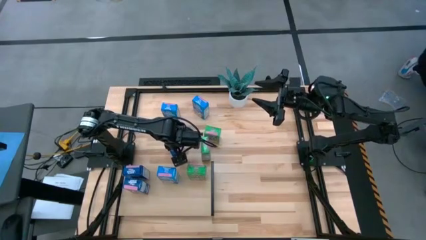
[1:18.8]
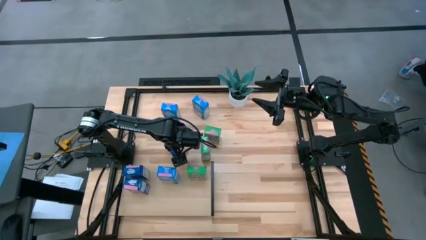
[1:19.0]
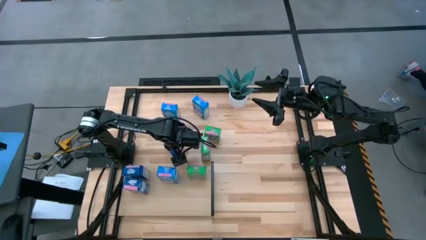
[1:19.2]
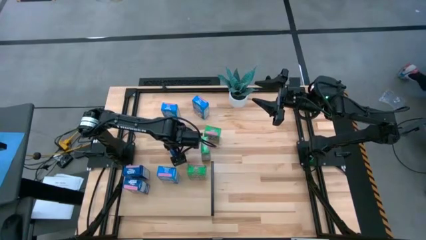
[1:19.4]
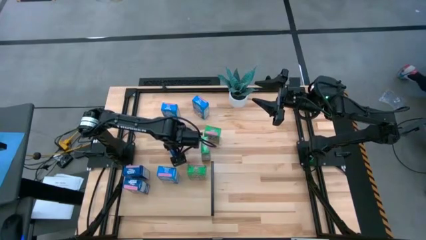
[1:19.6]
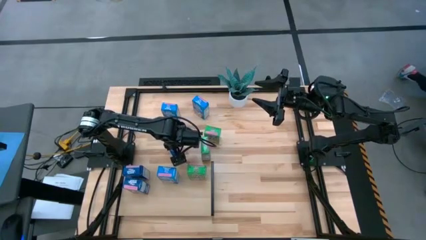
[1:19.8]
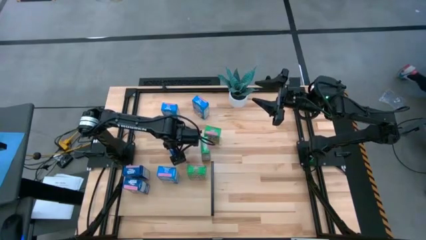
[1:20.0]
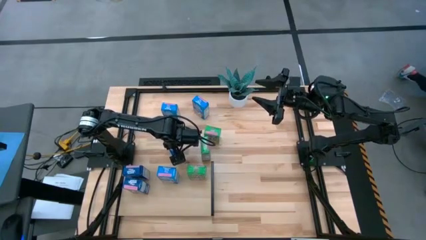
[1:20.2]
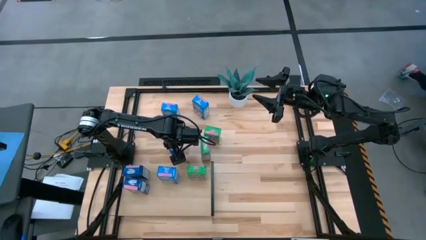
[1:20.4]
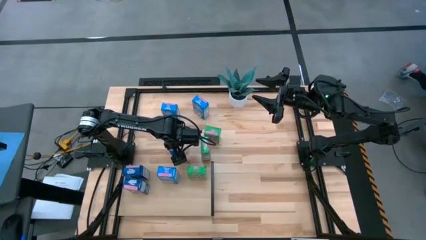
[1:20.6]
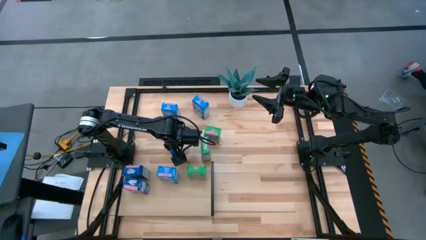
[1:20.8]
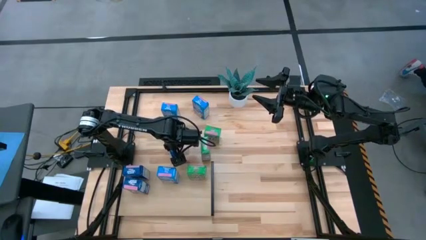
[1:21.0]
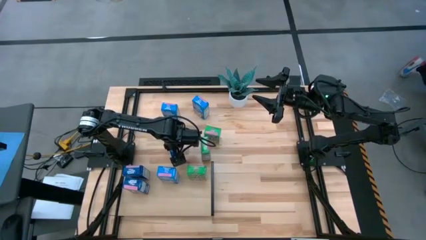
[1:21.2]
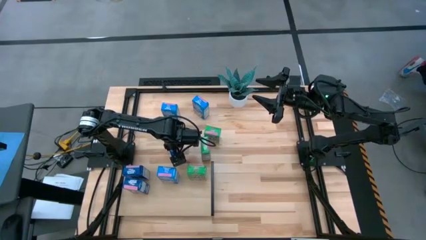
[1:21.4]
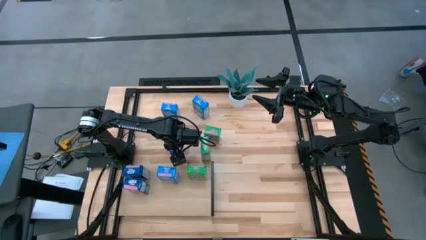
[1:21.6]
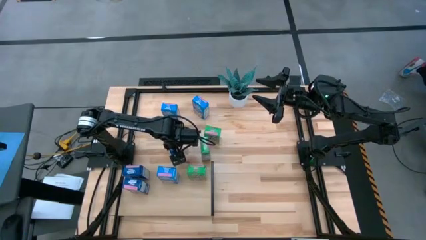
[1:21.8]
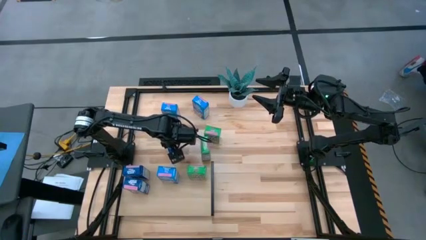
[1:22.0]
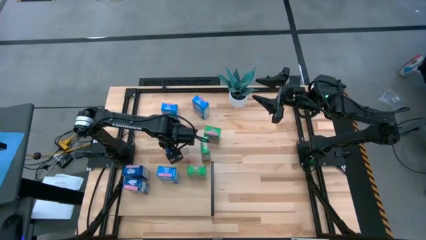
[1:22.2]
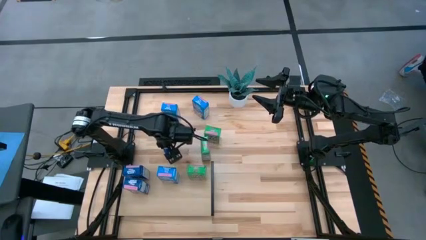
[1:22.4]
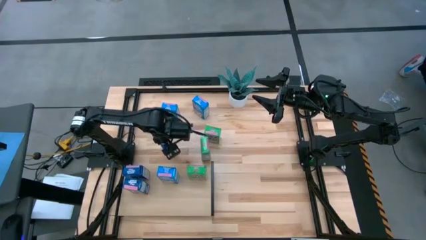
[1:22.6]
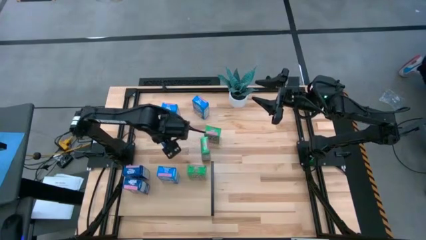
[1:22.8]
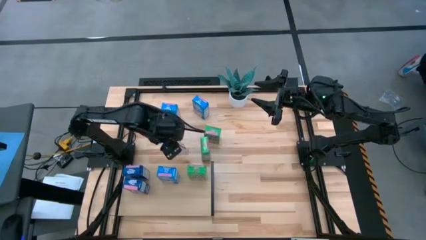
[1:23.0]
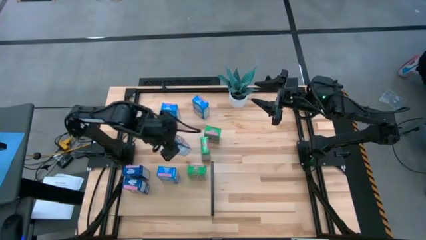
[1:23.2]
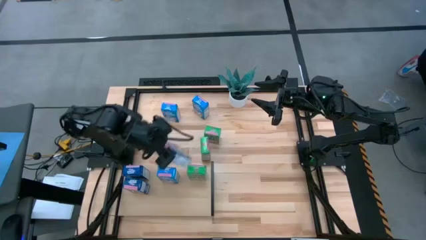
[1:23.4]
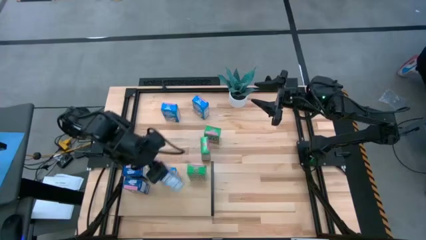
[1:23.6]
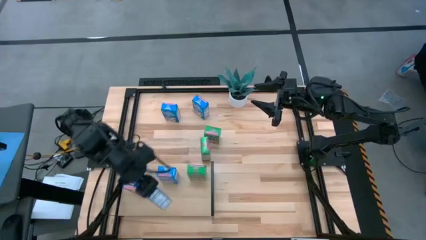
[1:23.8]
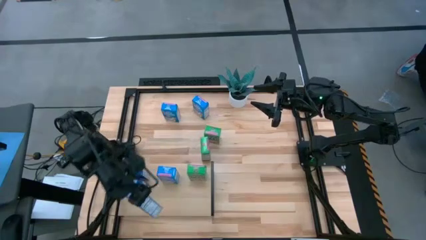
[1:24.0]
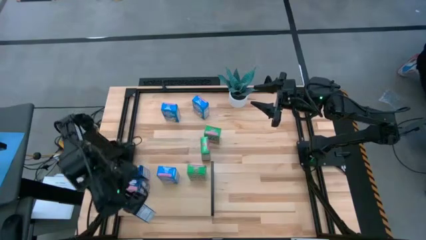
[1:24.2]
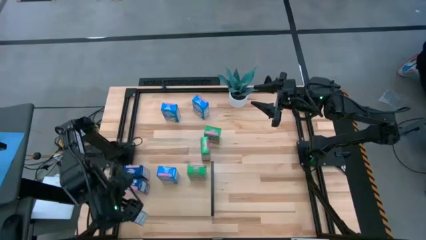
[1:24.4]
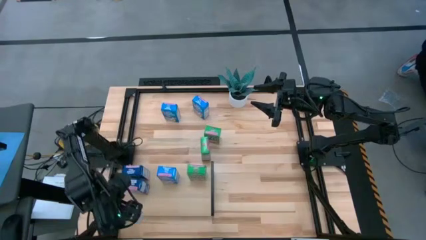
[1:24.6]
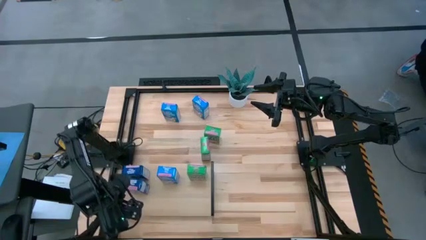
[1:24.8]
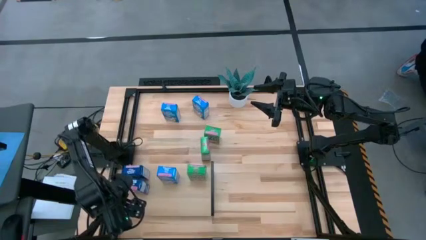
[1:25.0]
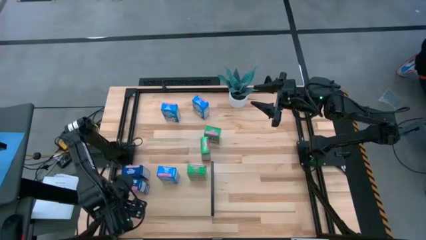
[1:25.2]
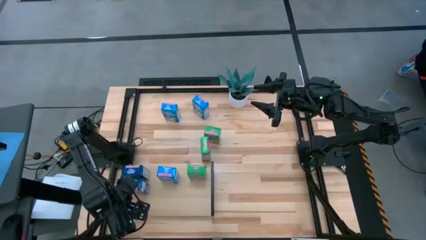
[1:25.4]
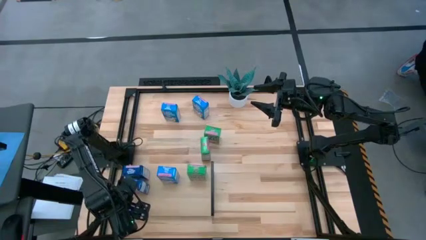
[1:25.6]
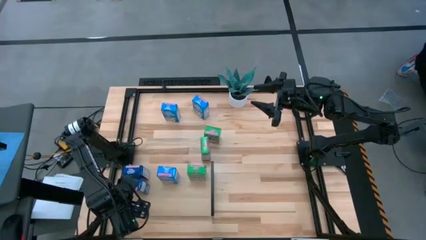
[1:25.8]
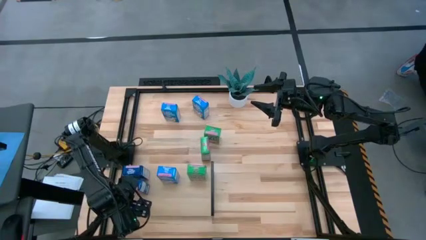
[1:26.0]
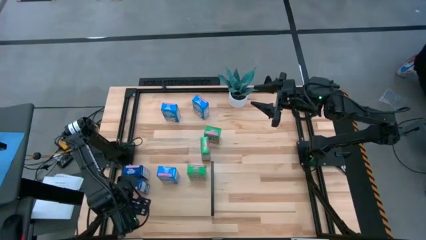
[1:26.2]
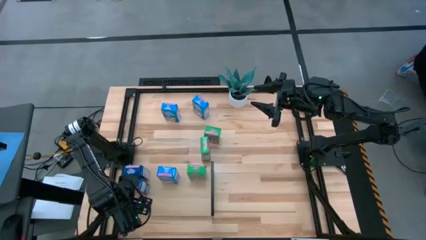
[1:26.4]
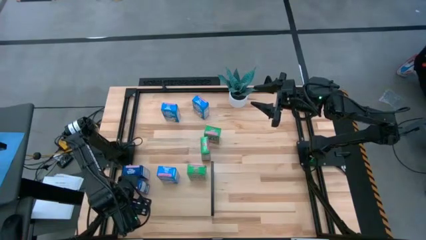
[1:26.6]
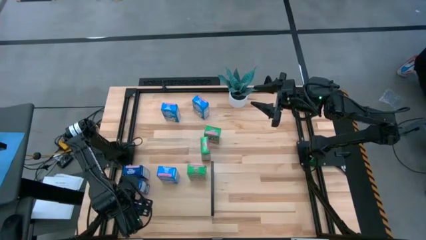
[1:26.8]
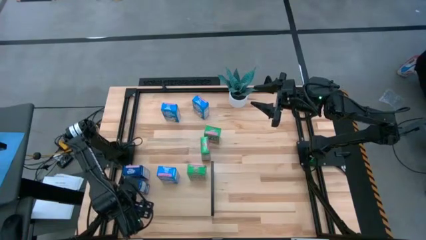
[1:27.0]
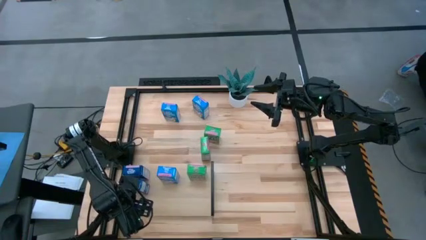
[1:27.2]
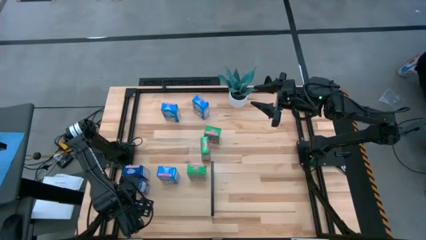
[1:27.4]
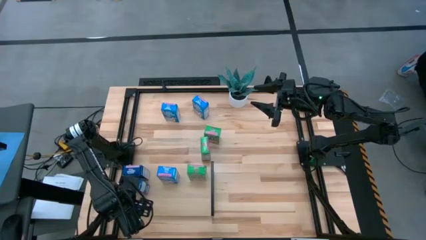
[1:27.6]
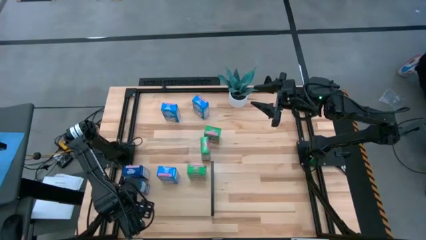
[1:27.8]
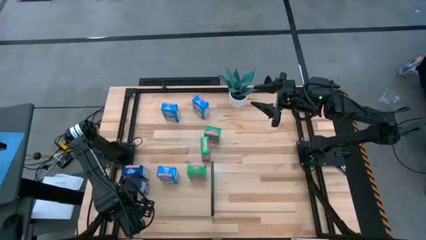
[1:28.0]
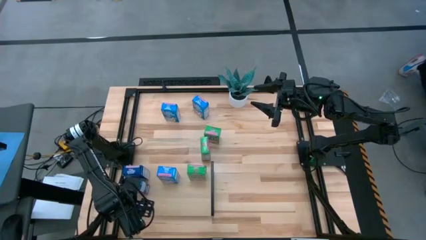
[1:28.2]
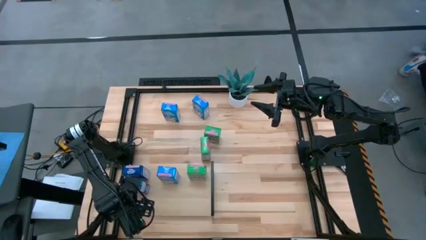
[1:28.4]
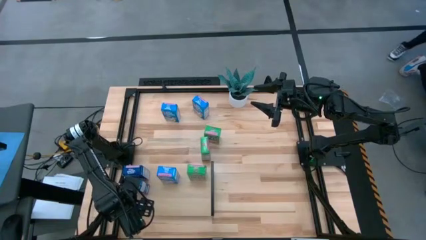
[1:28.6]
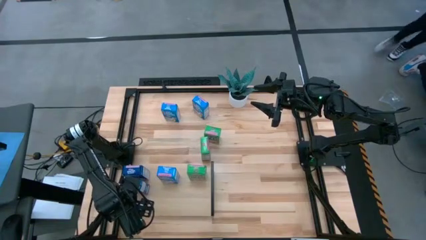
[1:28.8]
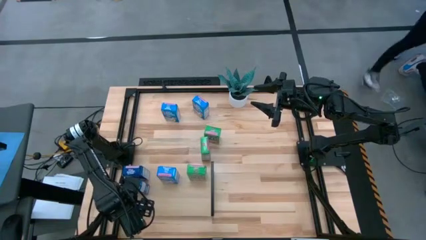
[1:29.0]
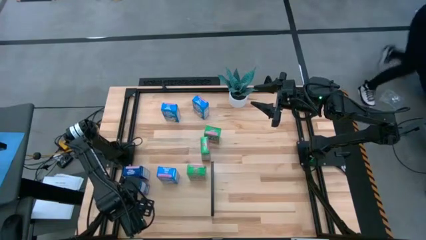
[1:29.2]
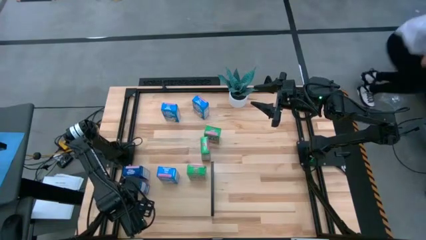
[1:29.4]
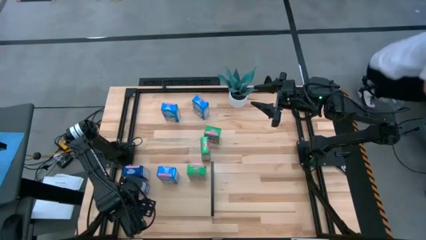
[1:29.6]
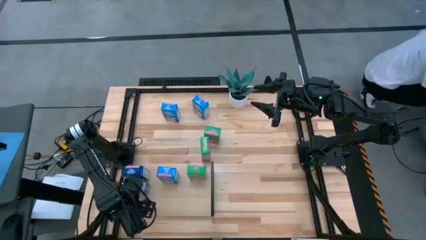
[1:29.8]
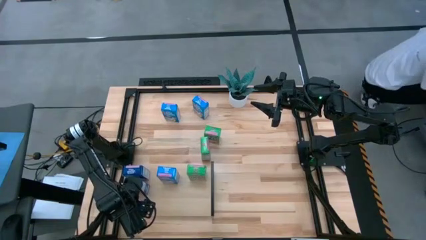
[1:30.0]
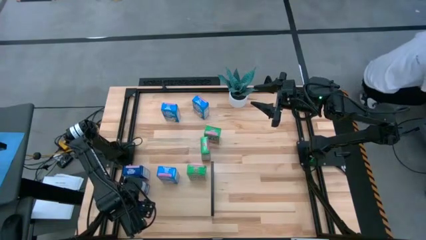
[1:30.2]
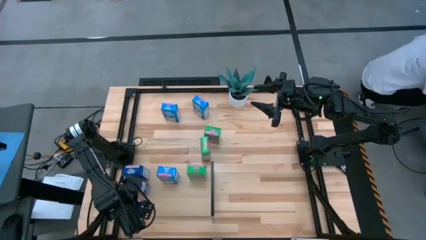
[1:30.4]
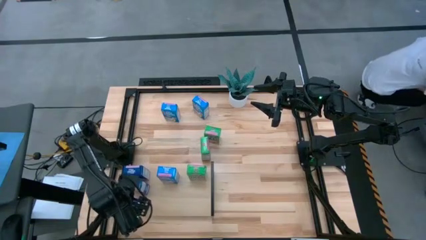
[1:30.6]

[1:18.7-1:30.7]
Task: Stack cereal on shelf
Put the blue cereal box on the shelf aligned with the other blue cereal boxes

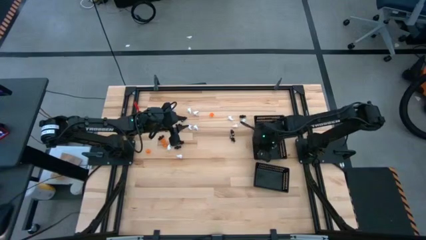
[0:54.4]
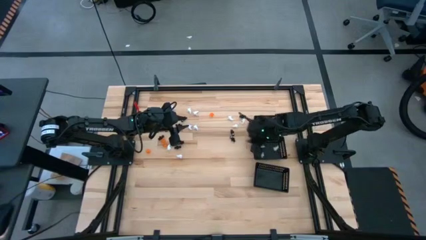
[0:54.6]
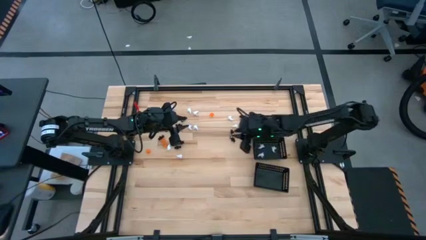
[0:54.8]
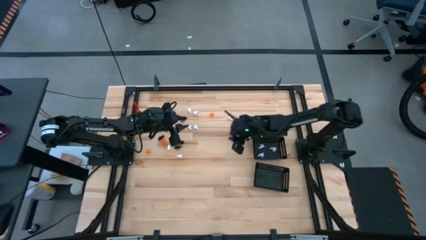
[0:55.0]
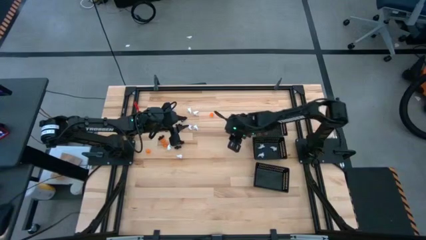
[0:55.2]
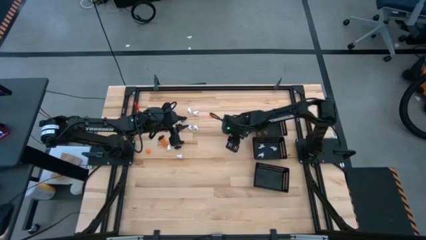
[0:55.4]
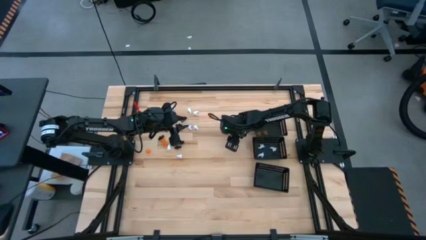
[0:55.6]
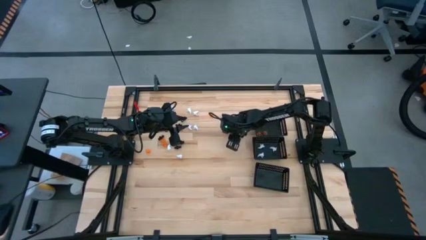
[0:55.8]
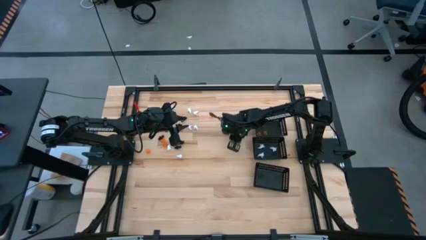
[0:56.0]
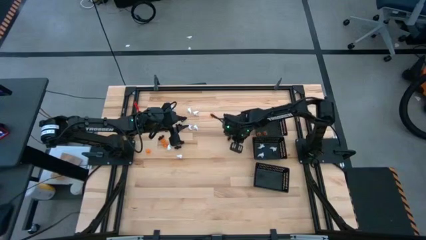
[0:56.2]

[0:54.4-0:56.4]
Task: Sort Halloween decoration
Put the black skeleton toy into the bottom black bin

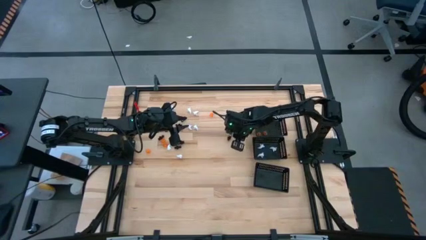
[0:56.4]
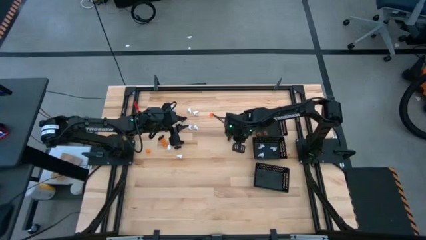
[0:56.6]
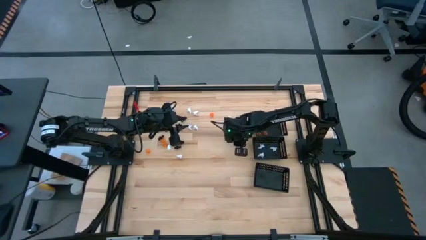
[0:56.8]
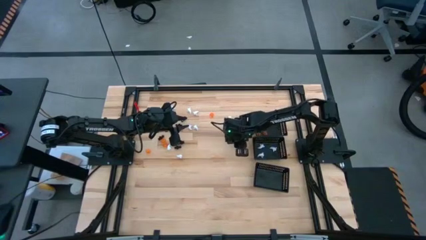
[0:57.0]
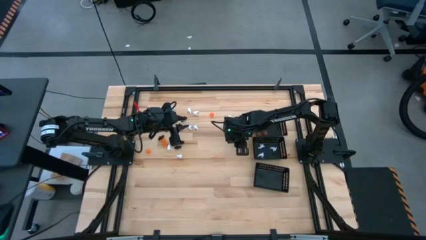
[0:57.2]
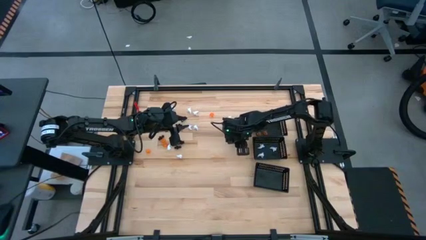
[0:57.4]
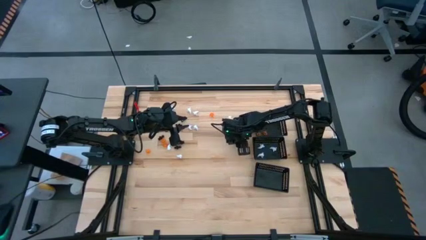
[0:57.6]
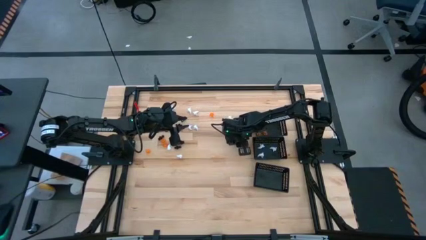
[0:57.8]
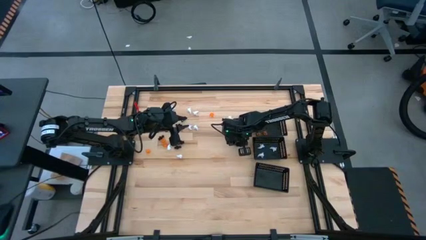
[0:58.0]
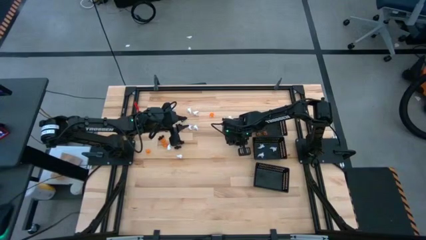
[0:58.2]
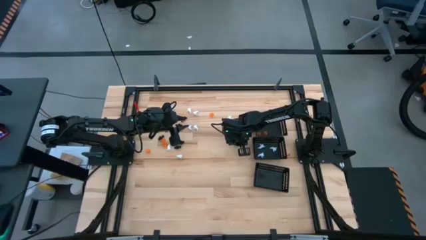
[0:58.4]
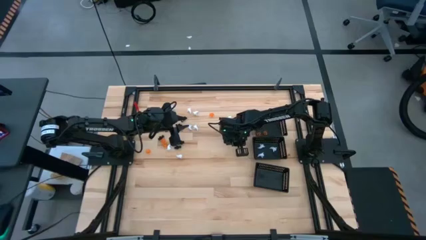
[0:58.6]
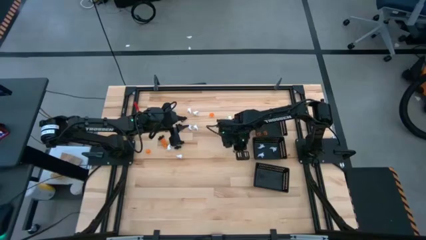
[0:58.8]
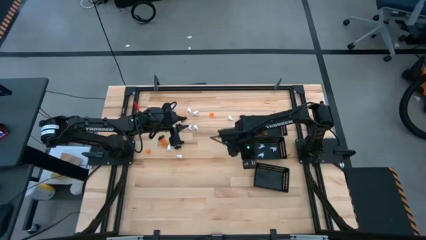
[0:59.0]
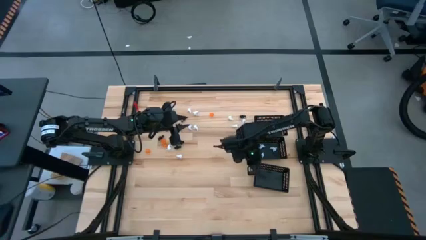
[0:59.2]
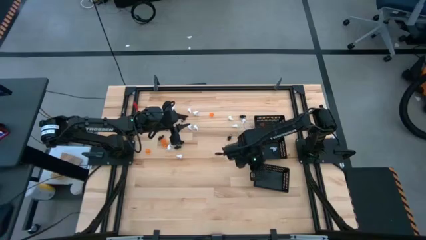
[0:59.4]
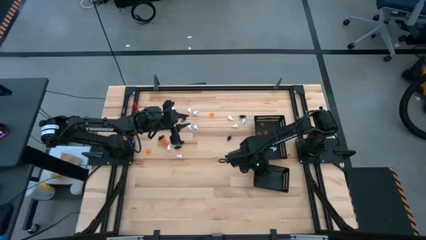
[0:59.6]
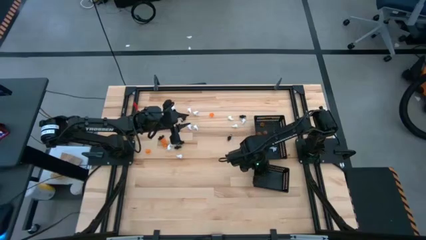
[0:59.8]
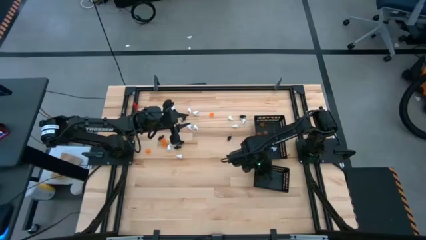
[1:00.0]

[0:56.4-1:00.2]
Put the black skeleton toy into the bottom black bin
